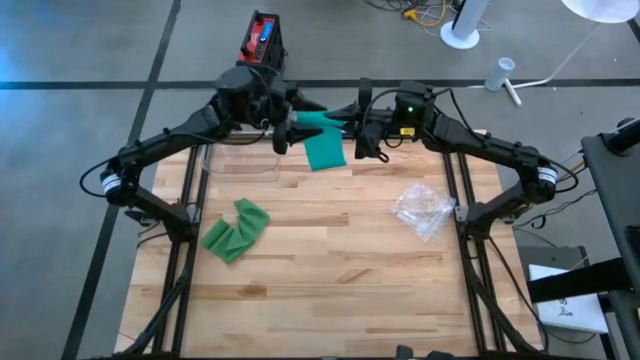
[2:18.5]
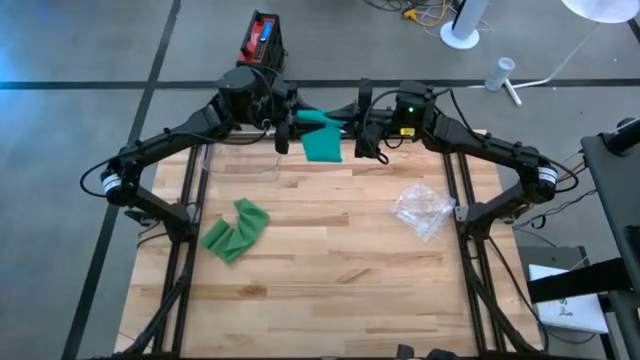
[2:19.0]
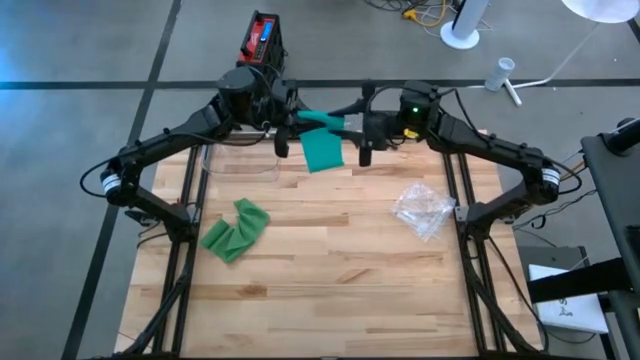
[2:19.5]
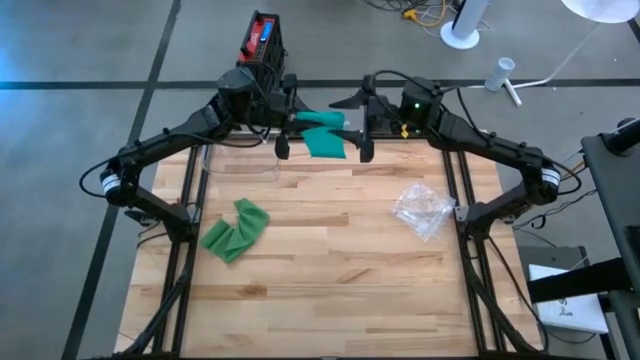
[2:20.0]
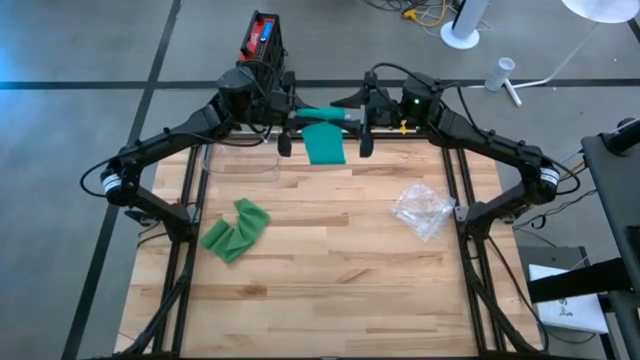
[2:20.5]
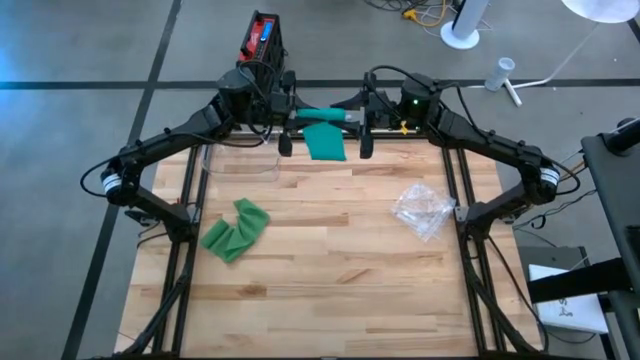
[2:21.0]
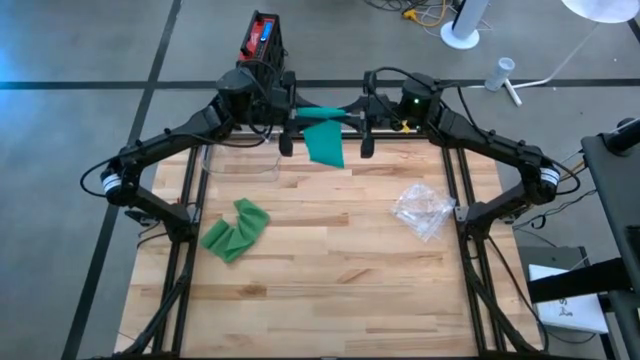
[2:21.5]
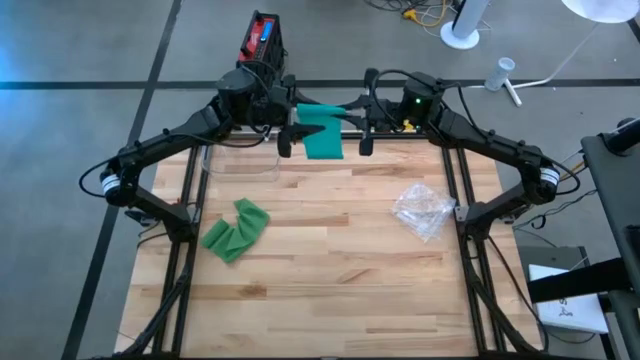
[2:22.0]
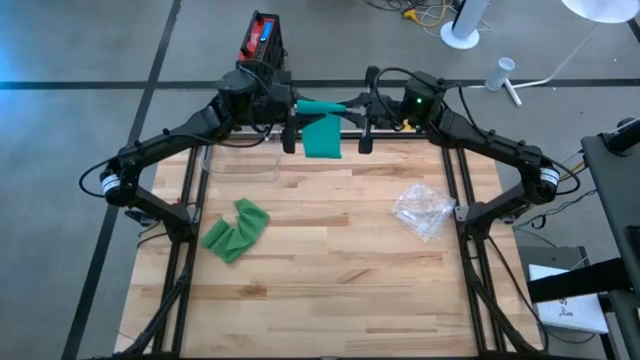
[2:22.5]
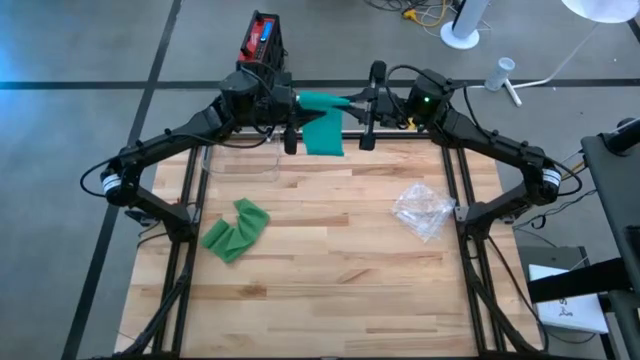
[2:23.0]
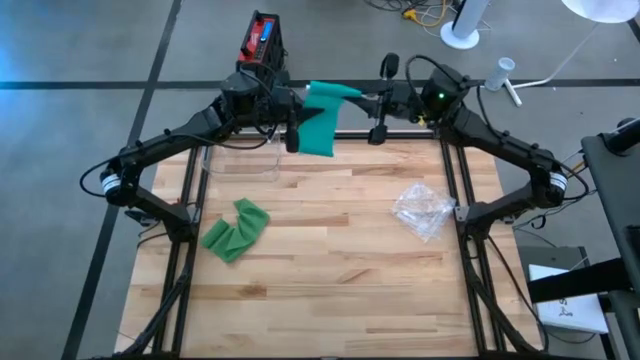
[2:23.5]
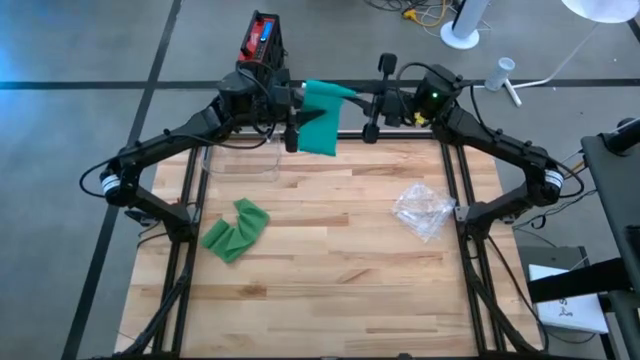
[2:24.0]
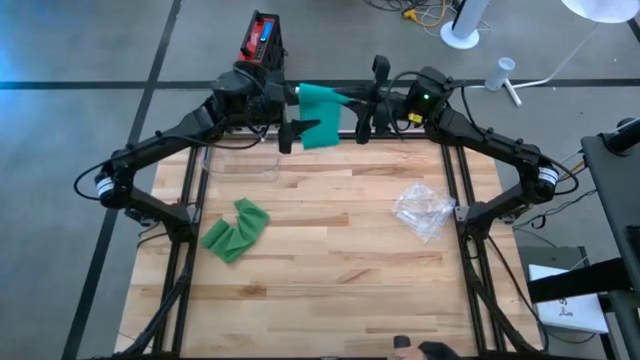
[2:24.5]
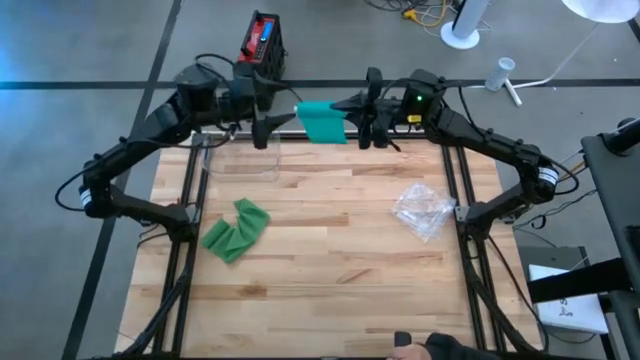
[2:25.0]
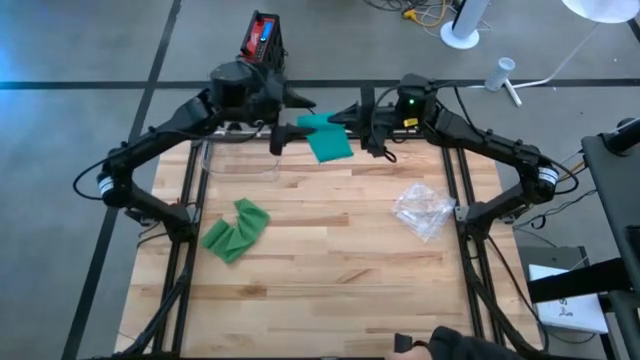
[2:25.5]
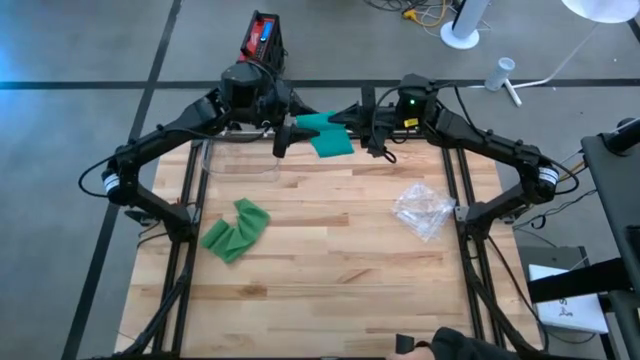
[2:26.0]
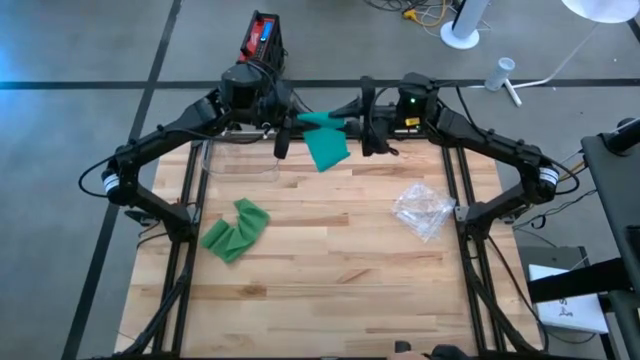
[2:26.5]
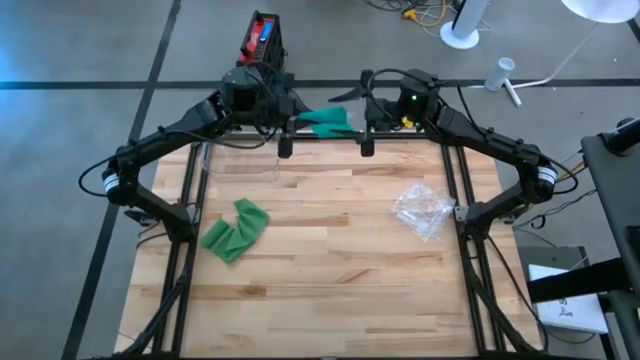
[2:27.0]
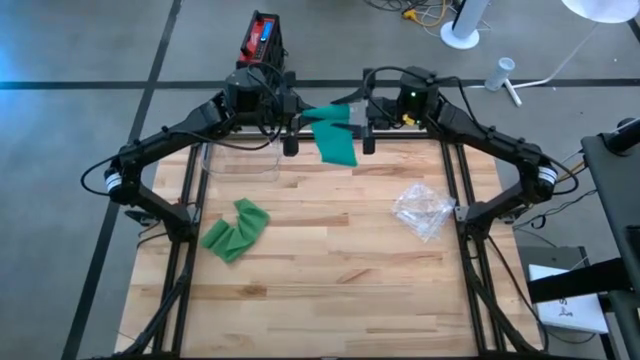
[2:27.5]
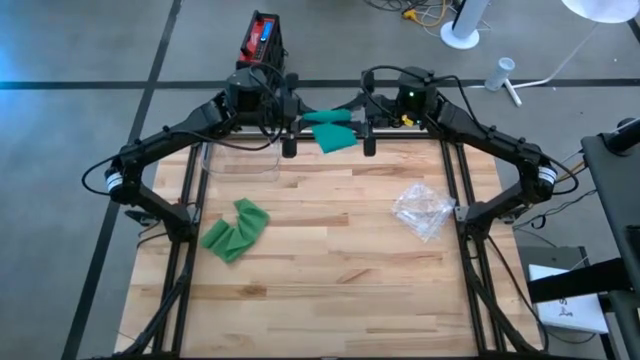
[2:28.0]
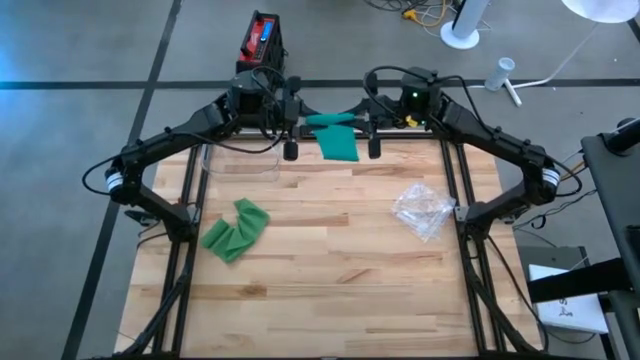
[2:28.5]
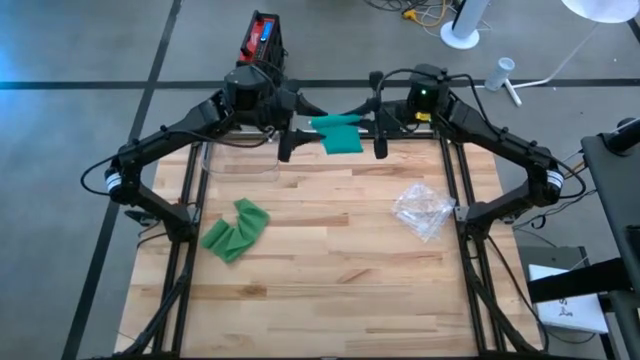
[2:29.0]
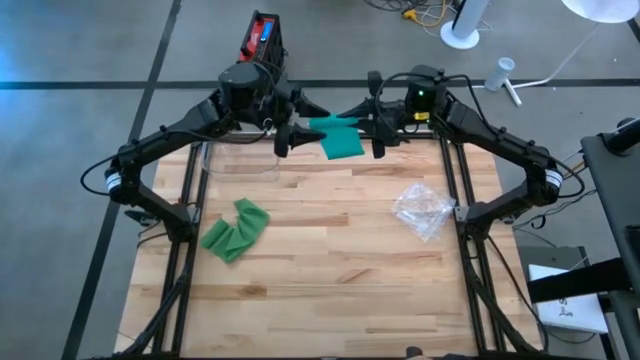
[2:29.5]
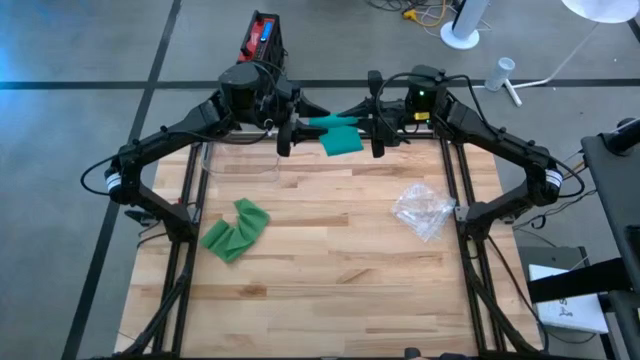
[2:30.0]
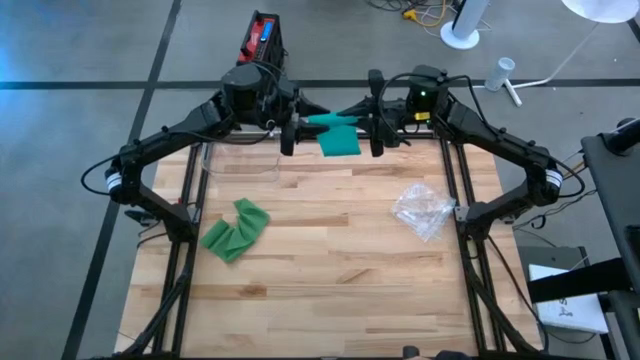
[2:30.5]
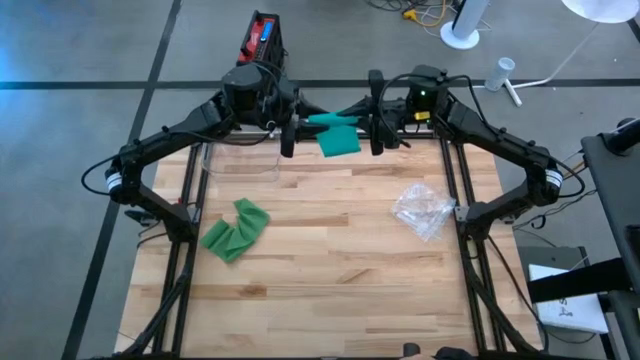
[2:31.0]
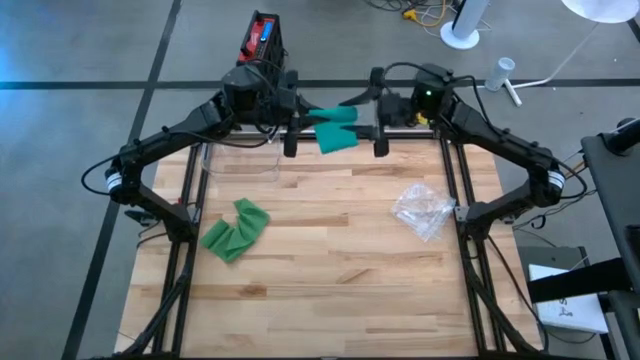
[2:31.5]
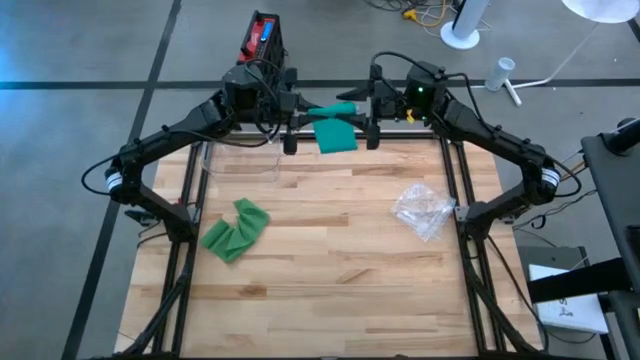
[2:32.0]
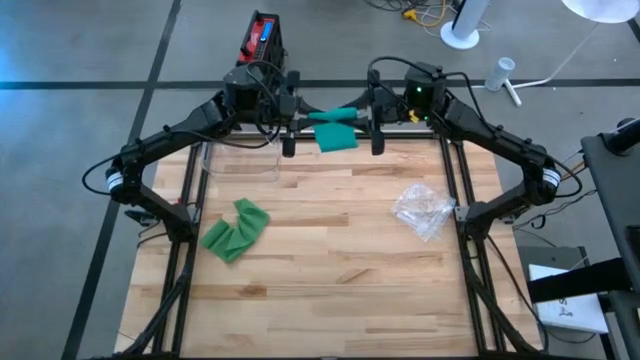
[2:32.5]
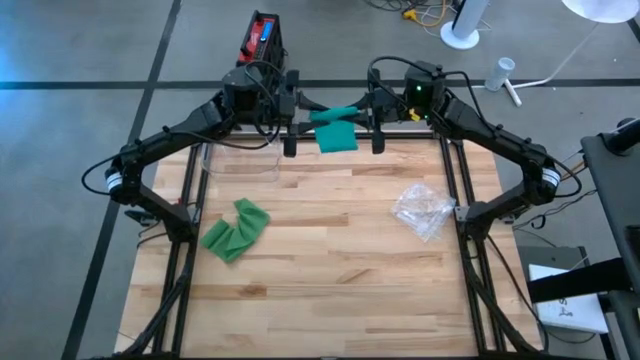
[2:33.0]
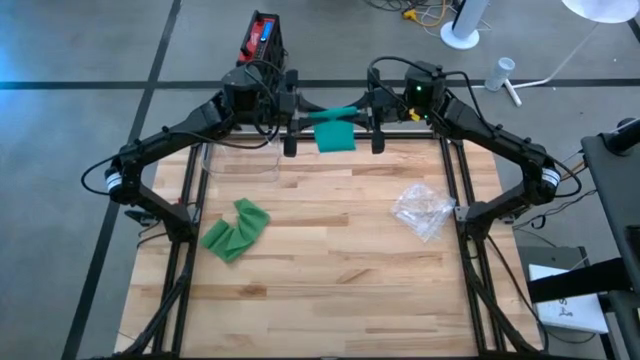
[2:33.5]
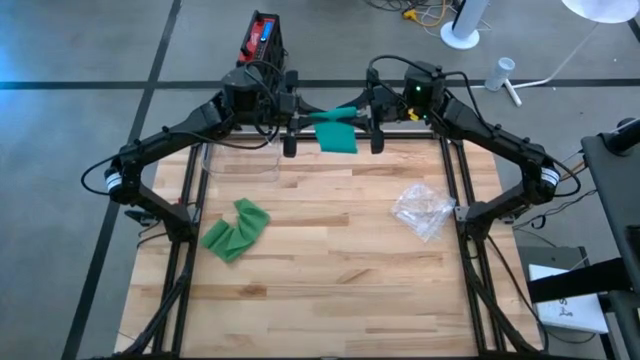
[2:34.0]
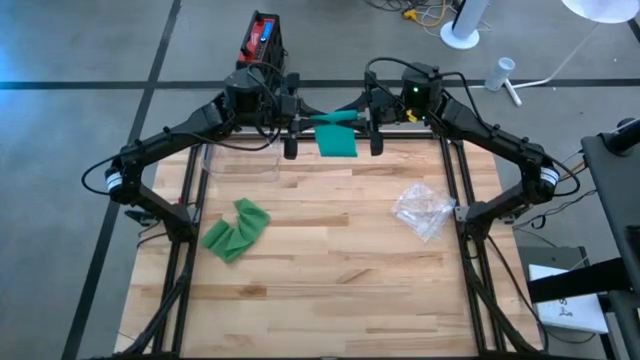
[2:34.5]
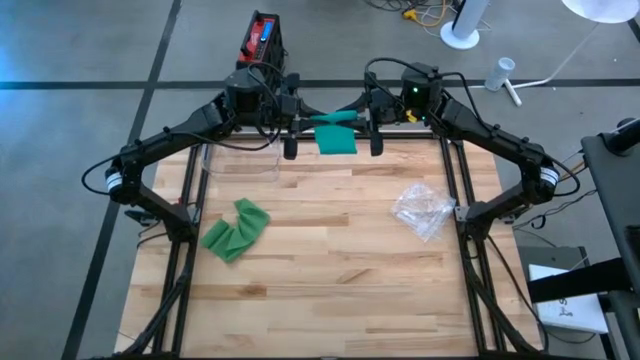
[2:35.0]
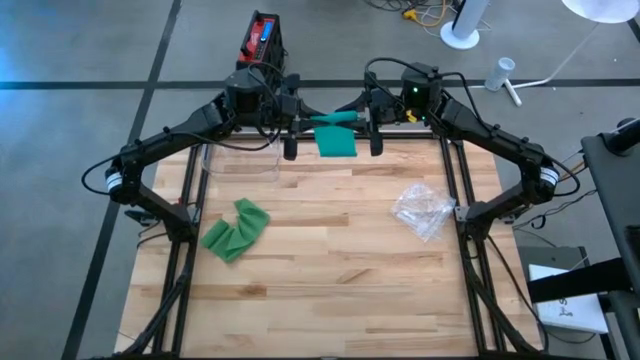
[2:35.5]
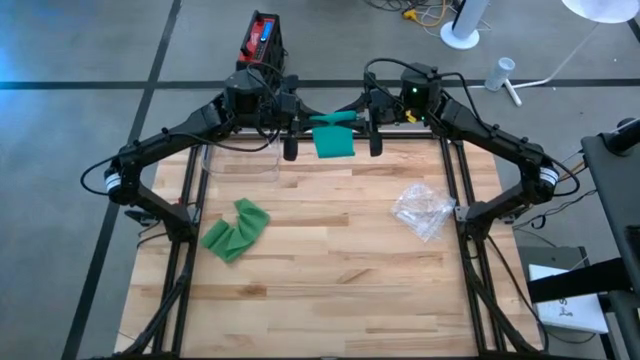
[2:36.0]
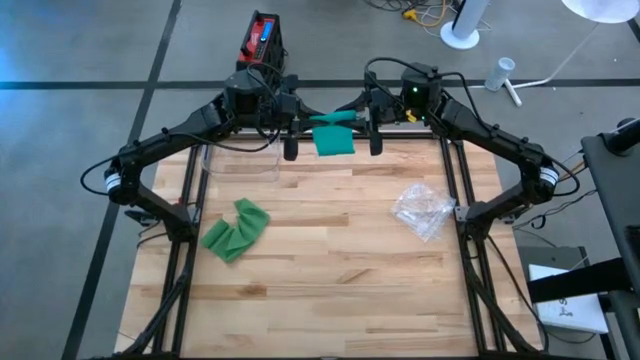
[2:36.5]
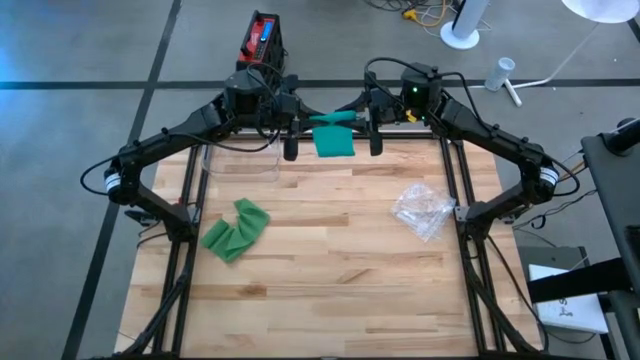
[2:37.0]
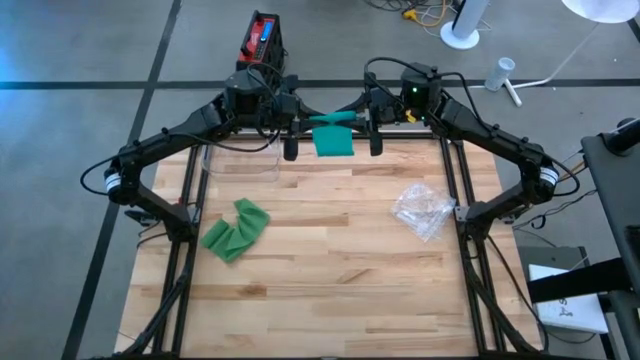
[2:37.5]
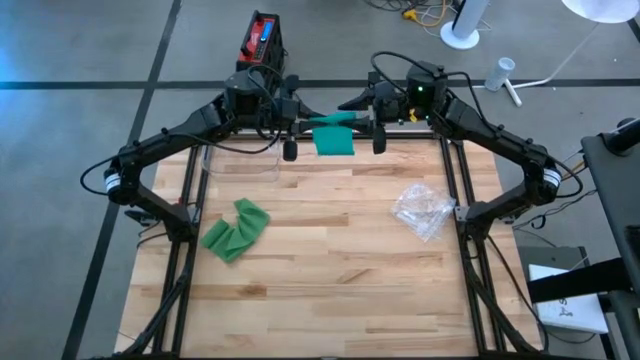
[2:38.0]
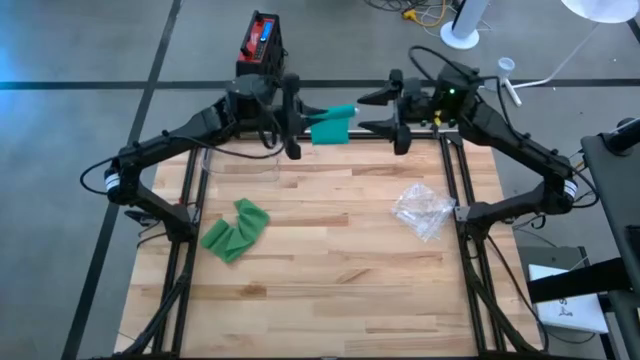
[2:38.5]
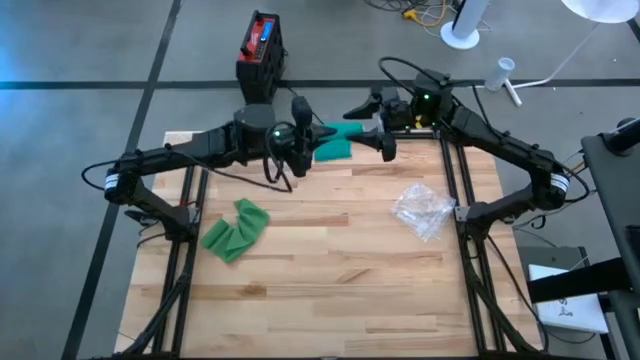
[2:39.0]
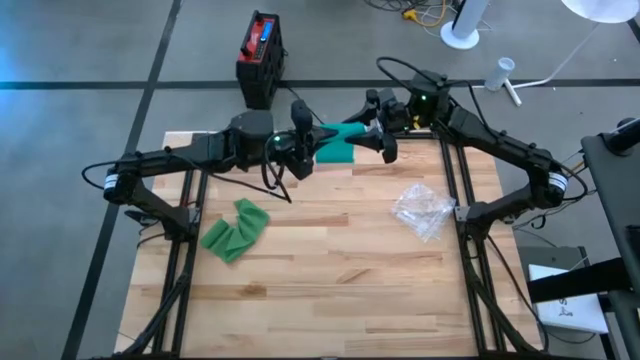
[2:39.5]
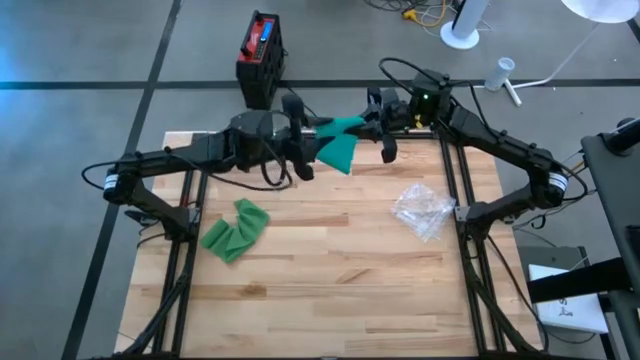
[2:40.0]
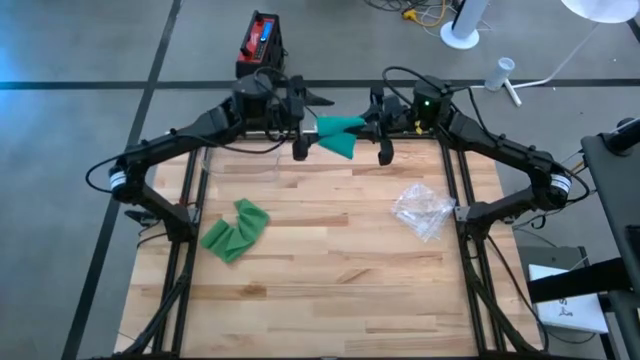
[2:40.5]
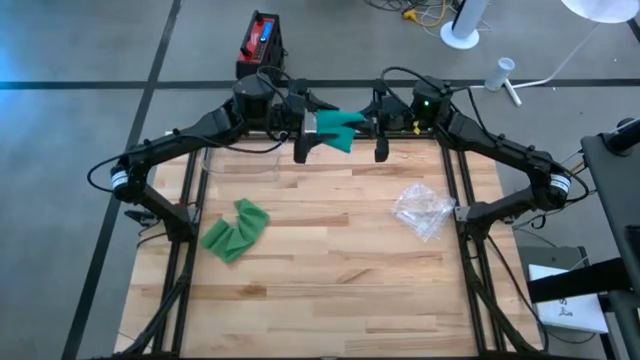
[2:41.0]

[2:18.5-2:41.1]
Task: Roll bandage
Roll the blue bandage
